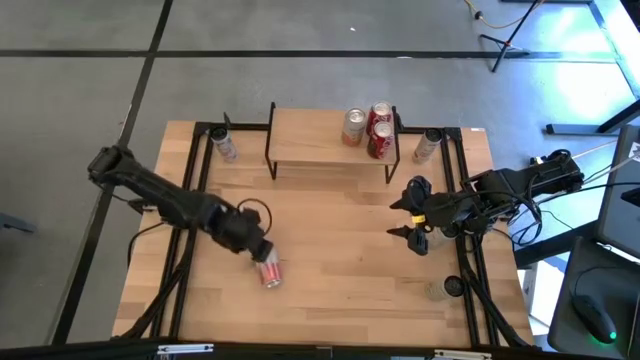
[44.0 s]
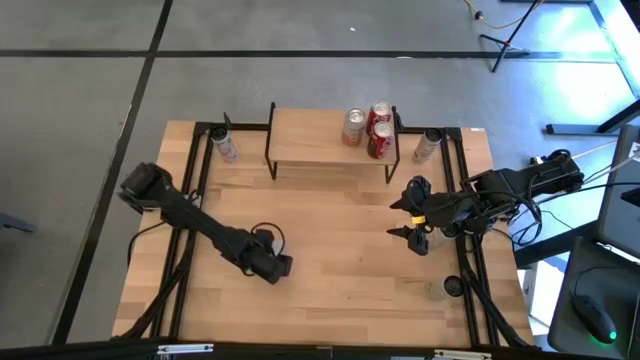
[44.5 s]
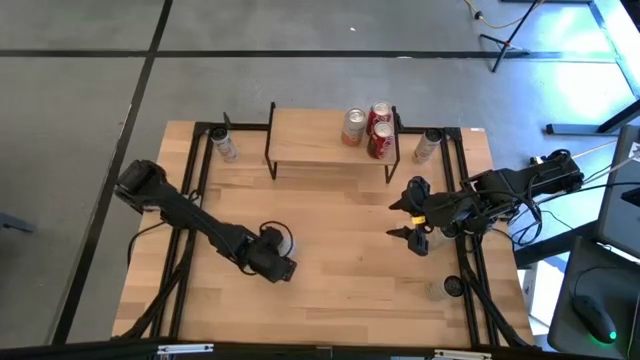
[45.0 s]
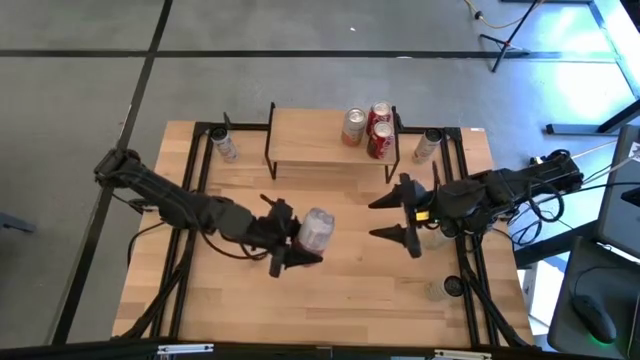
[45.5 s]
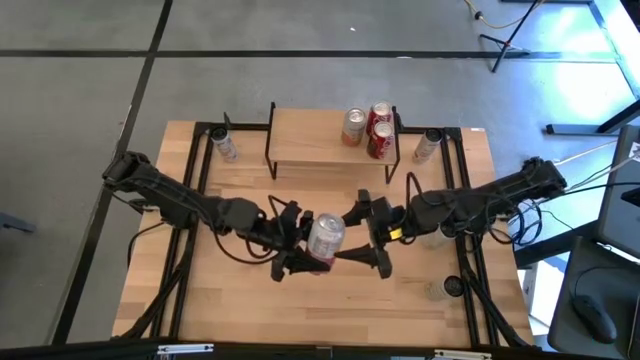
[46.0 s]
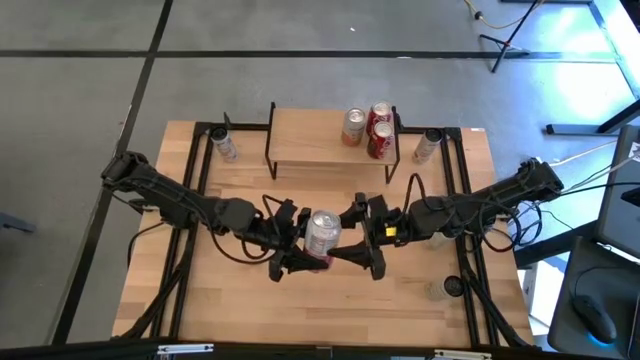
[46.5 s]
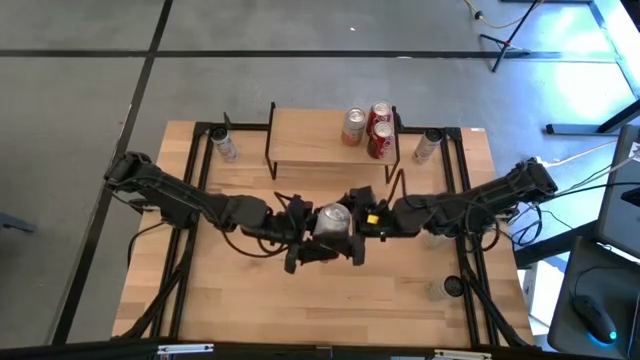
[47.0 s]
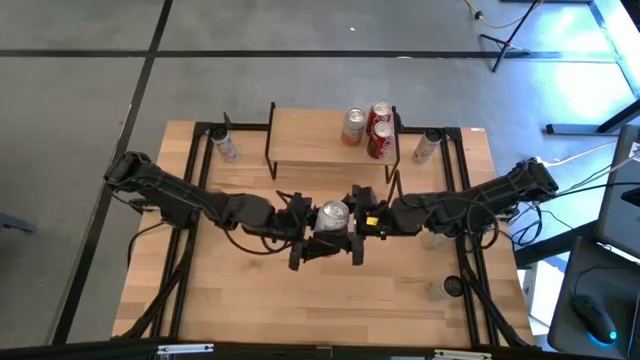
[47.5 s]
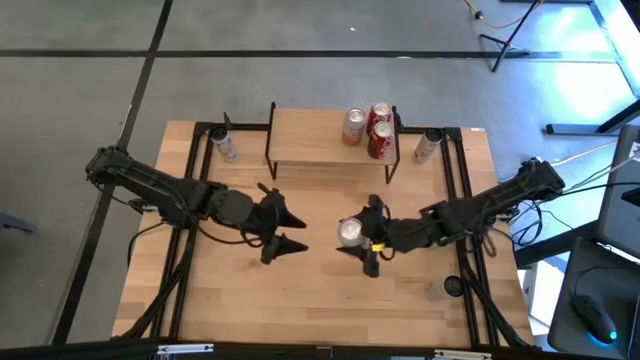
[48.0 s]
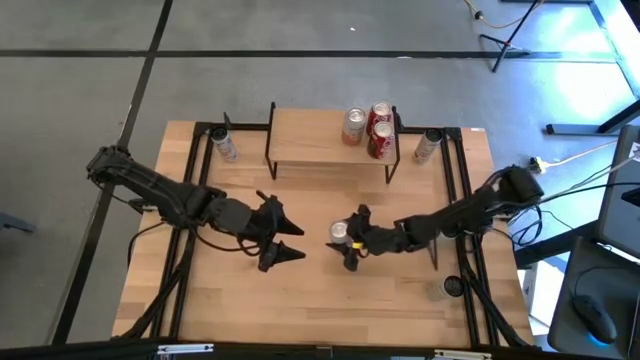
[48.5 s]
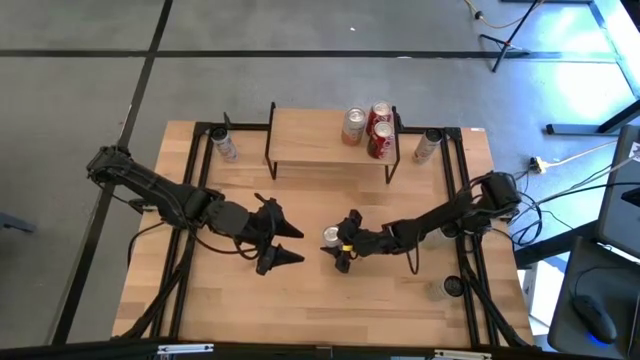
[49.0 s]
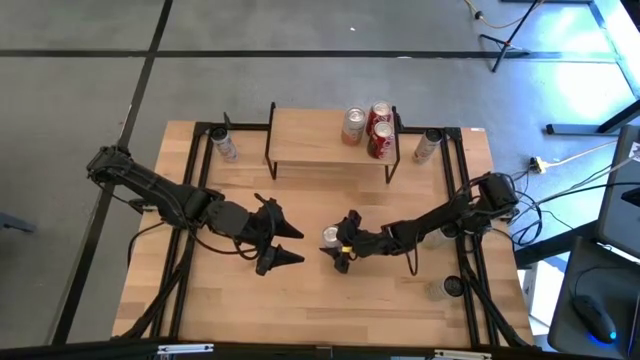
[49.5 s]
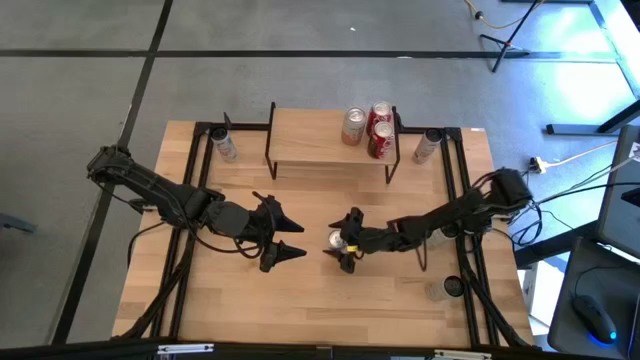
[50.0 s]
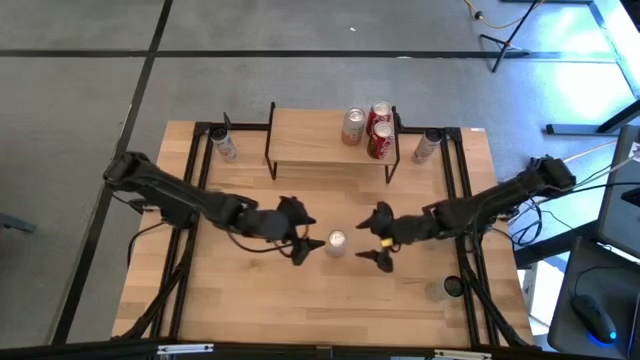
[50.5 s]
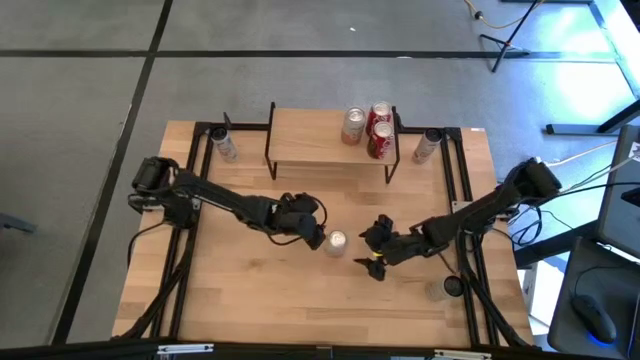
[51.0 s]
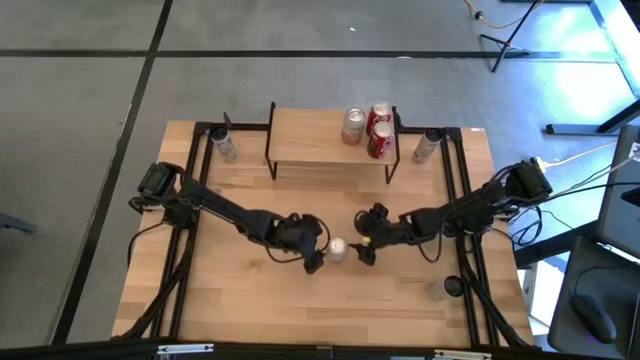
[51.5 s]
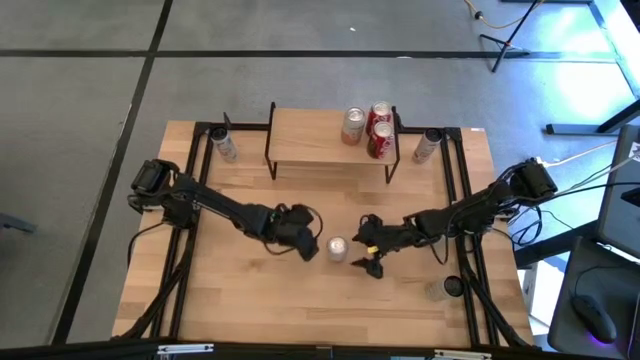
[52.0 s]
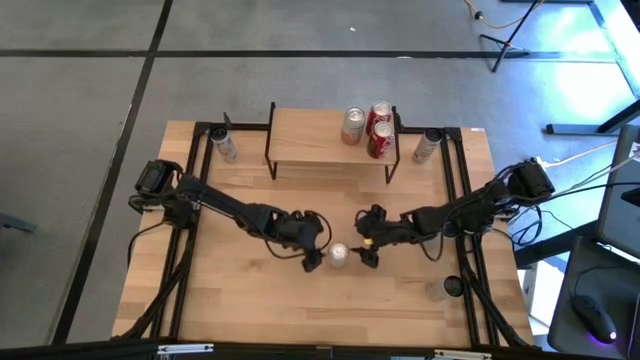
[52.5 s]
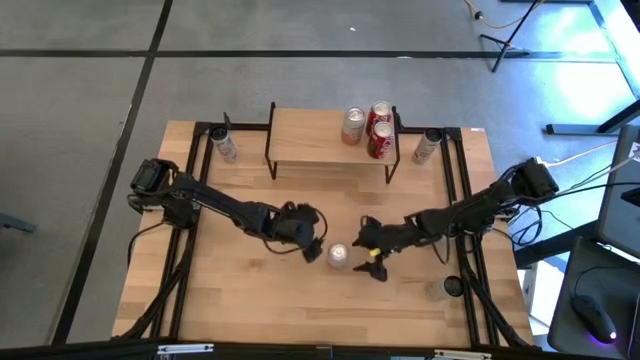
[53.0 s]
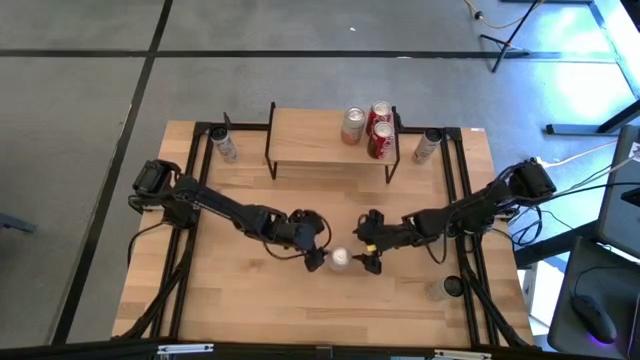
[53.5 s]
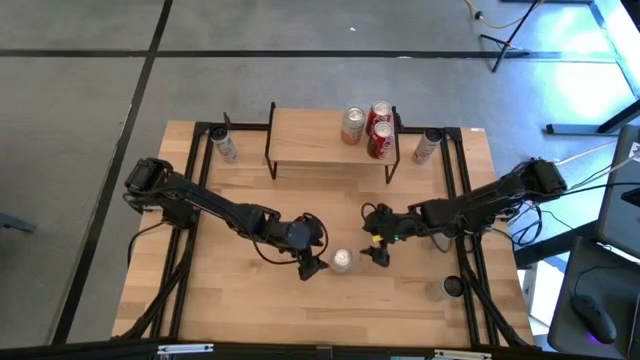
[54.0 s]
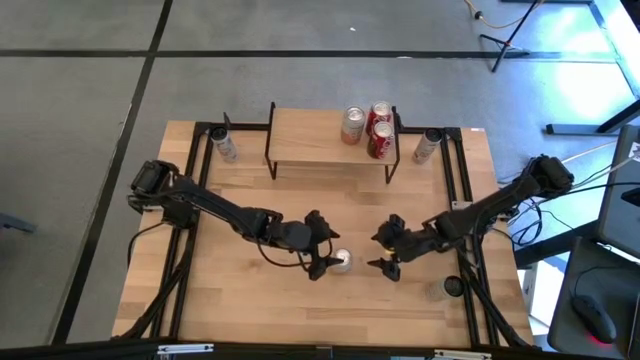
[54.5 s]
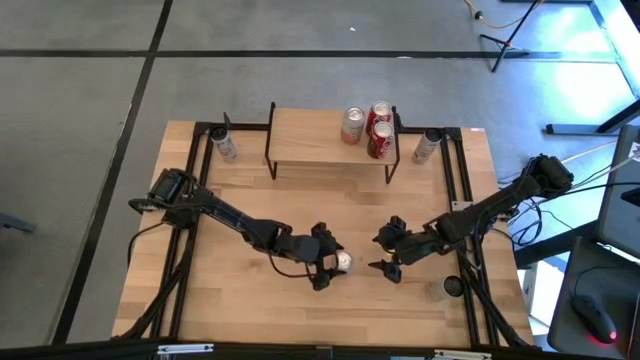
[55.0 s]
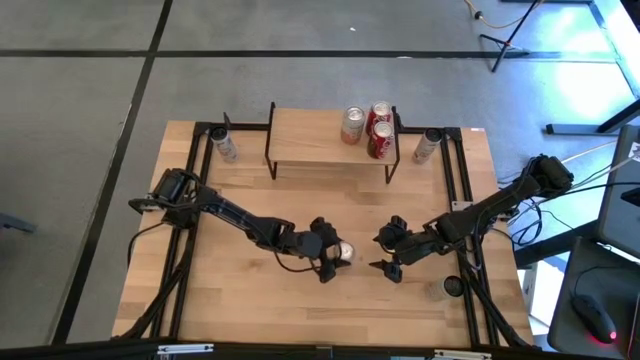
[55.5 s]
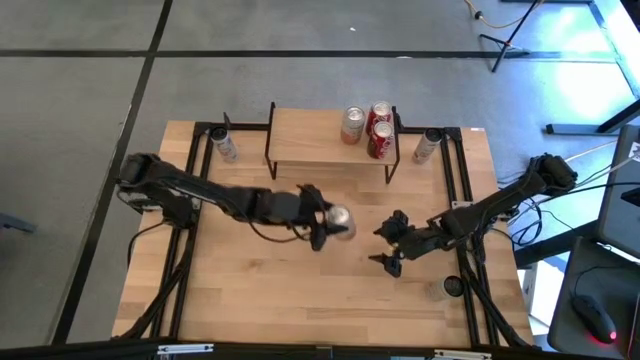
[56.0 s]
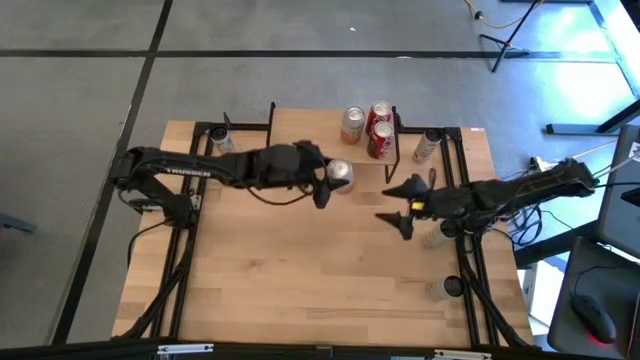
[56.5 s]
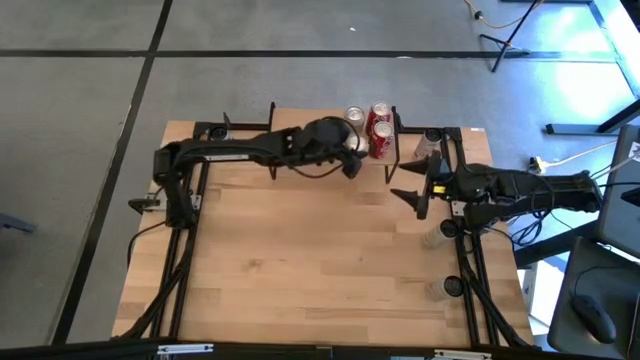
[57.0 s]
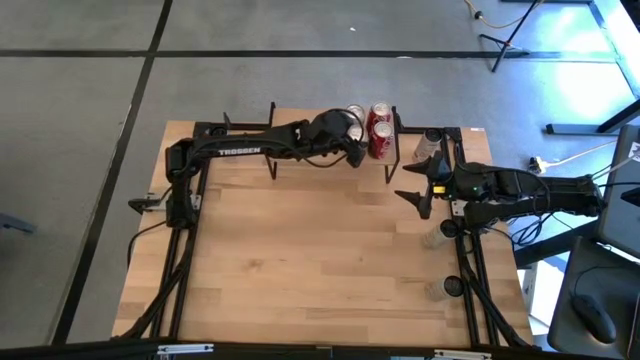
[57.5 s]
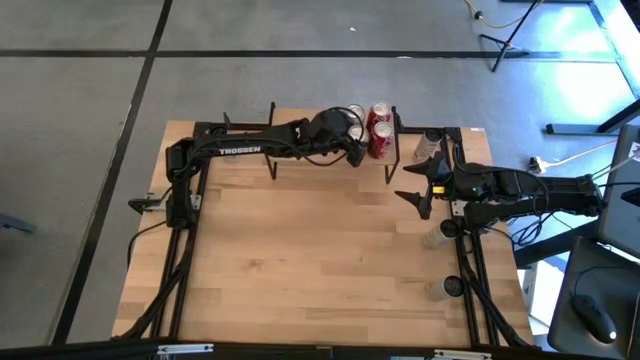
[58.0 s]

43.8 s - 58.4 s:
Task: Place canned beverage on shelf
Put the pink soda can on the shelf aligned with the other pink soda can

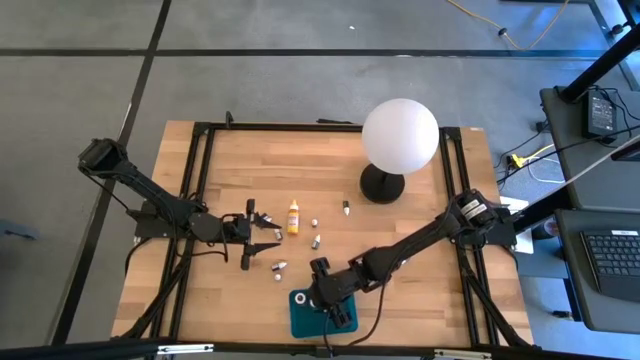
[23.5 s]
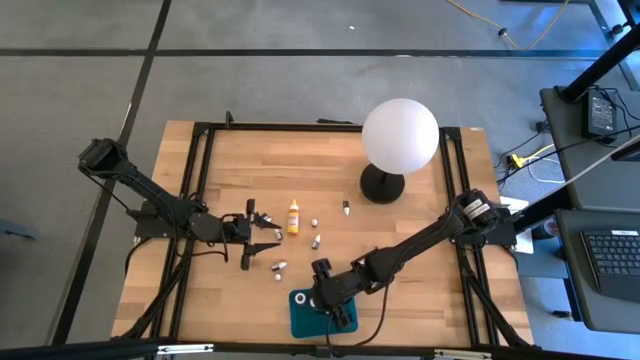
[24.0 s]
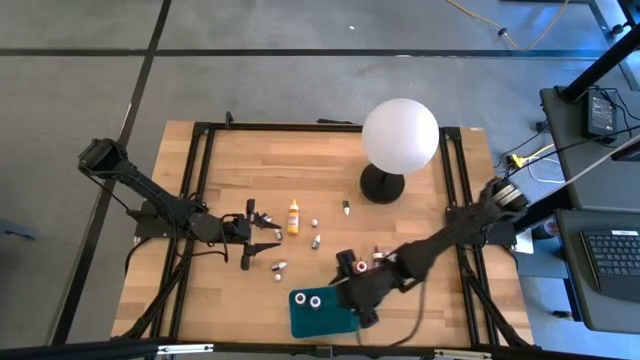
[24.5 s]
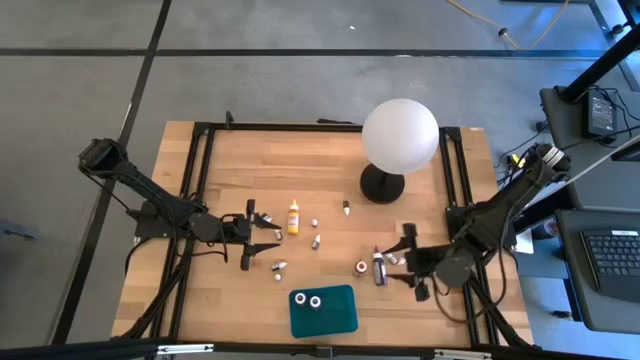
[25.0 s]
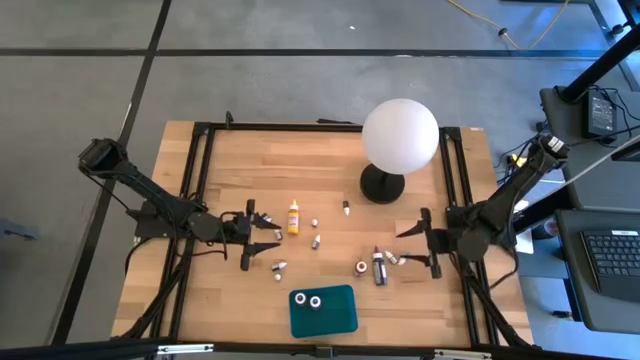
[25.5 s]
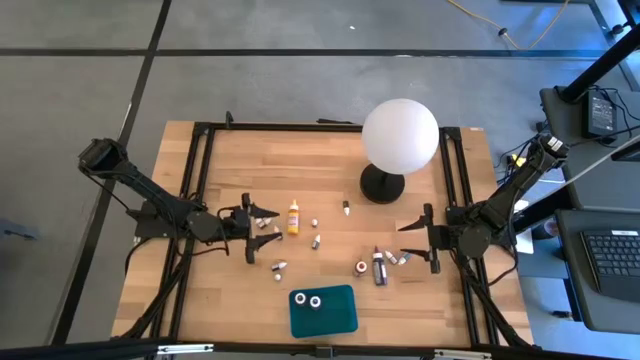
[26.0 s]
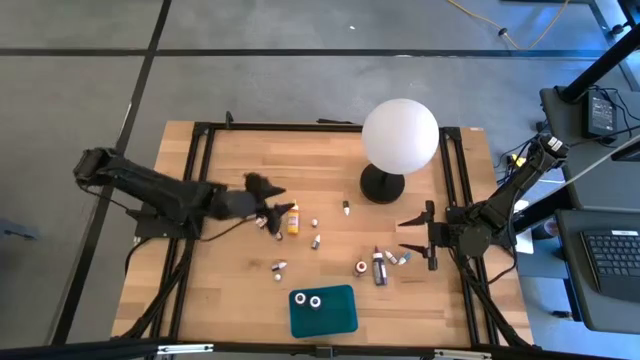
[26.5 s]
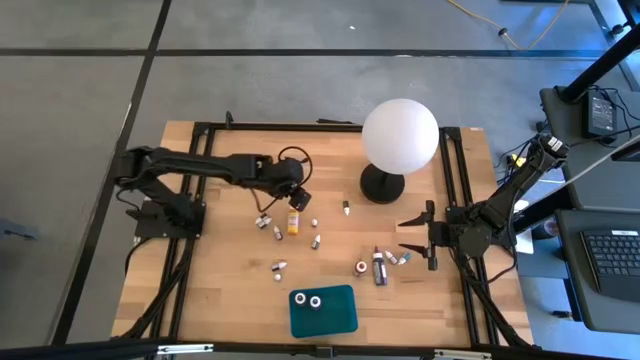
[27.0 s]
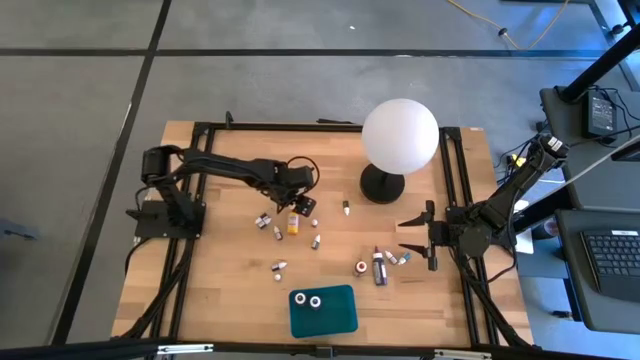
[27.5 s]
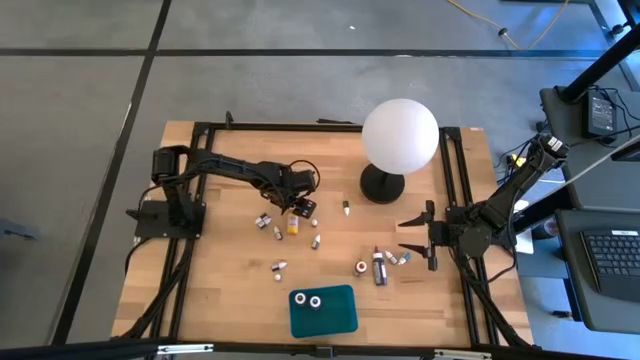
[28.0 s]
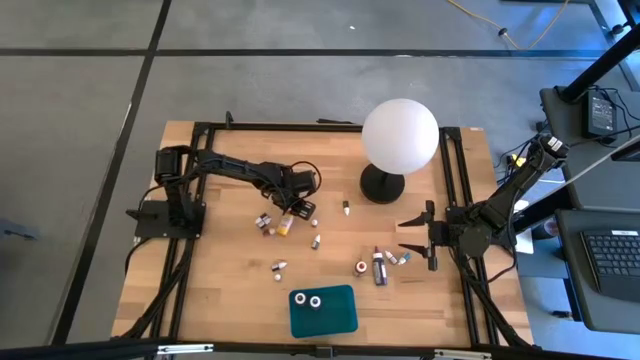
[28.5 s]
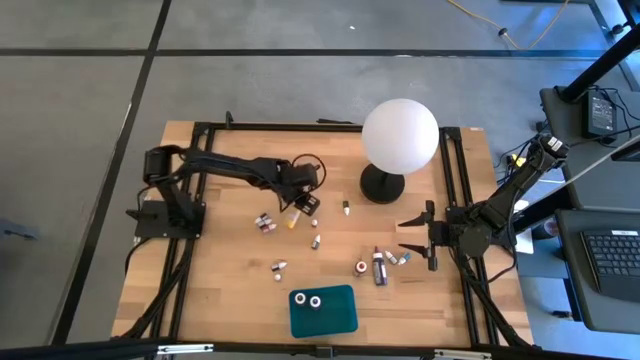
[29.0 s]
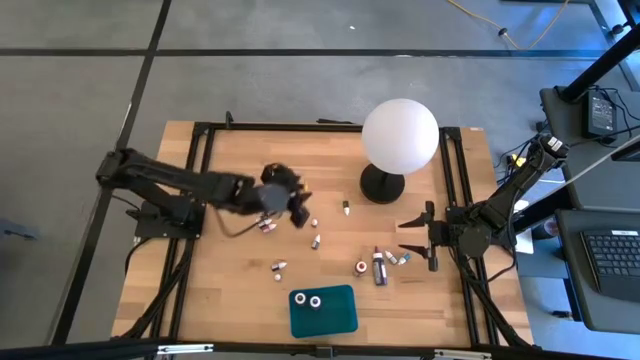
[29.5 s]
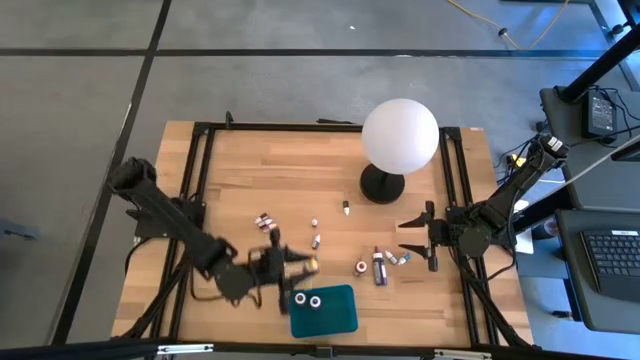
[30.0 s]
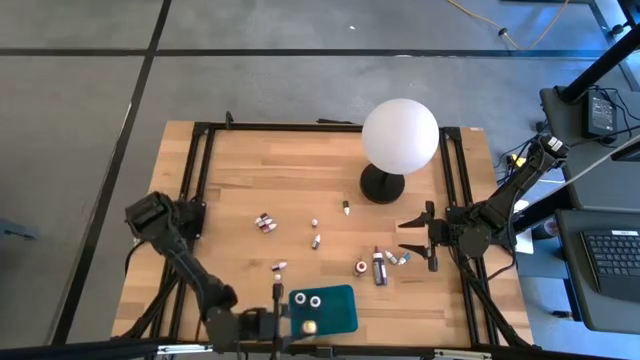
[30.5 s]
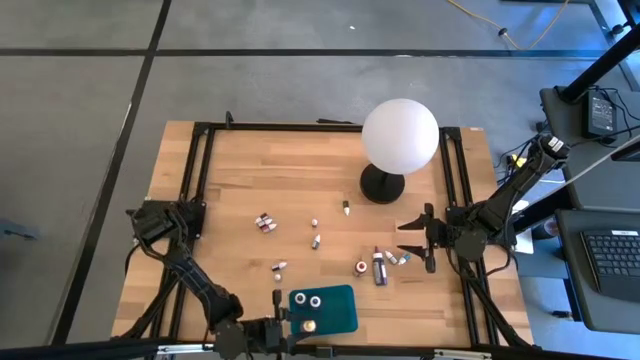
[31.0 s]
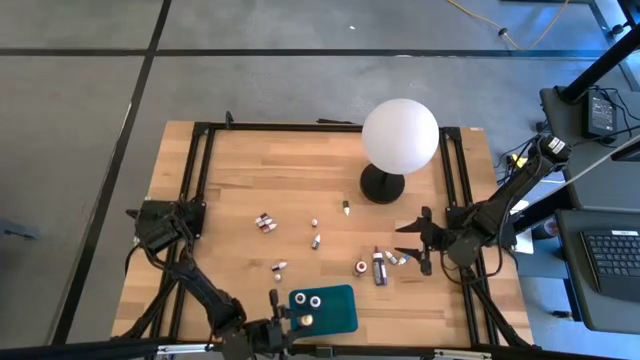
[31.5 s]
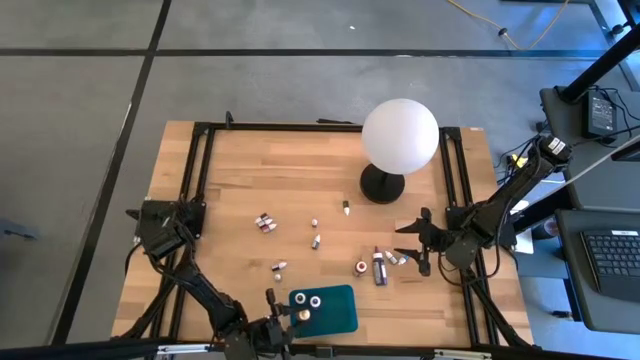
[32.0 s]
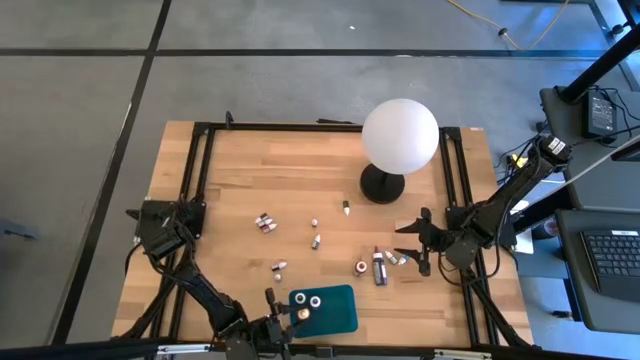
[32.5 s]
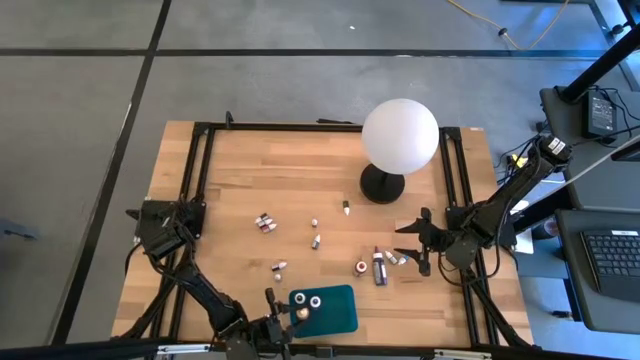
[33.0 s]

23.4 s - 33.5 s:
Task: Pick & Place food coloring
Put the large yellow food coloring bottle into the blue bin
